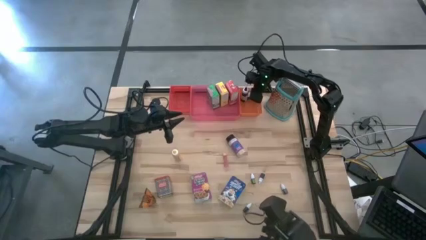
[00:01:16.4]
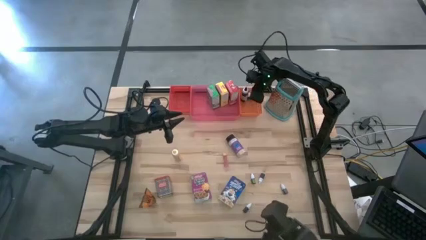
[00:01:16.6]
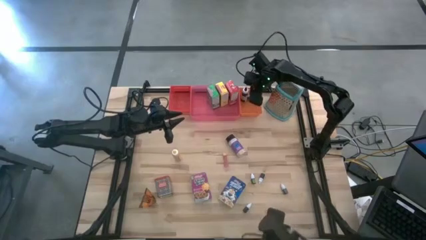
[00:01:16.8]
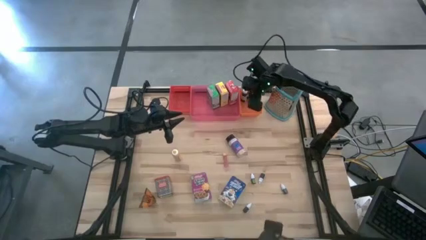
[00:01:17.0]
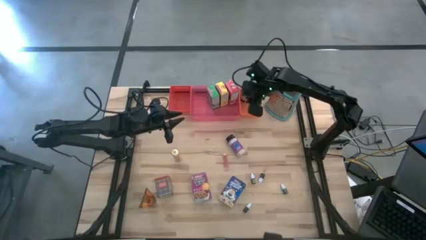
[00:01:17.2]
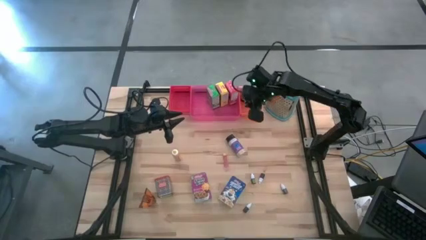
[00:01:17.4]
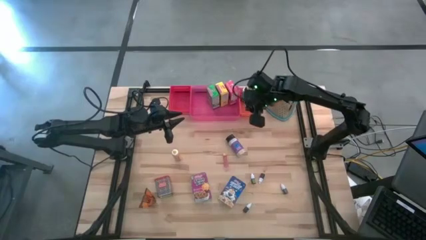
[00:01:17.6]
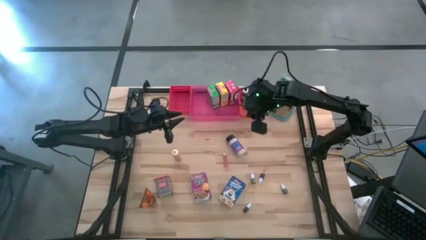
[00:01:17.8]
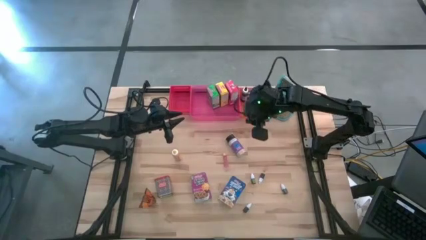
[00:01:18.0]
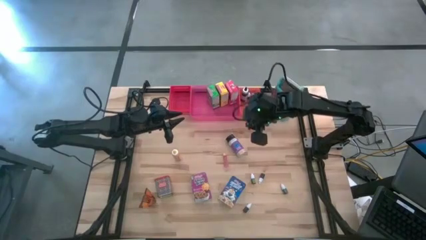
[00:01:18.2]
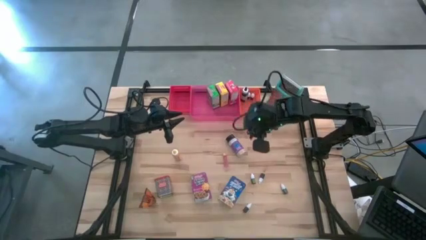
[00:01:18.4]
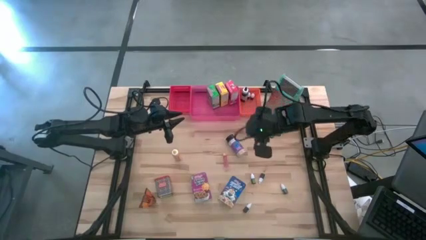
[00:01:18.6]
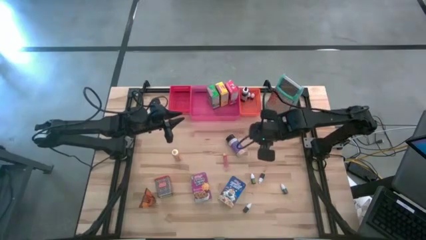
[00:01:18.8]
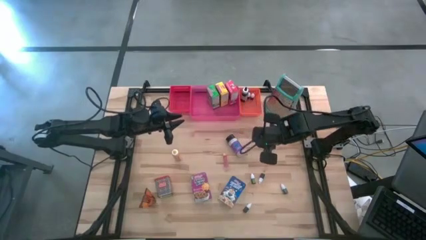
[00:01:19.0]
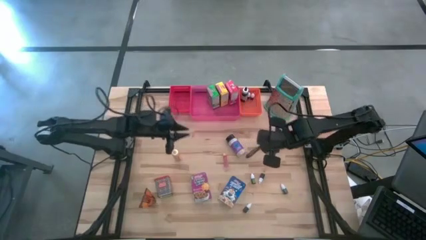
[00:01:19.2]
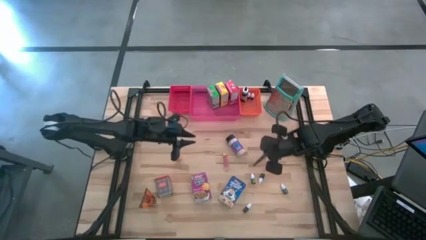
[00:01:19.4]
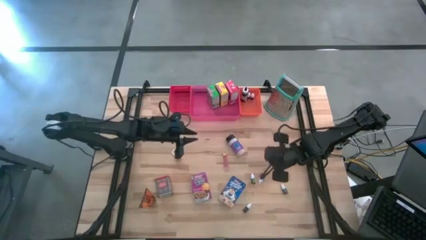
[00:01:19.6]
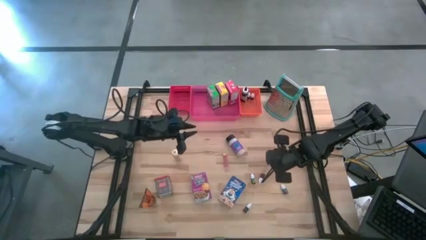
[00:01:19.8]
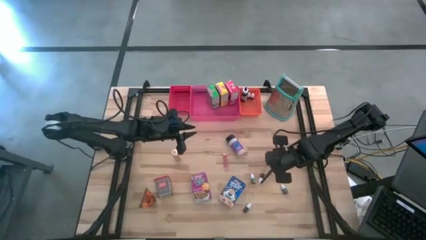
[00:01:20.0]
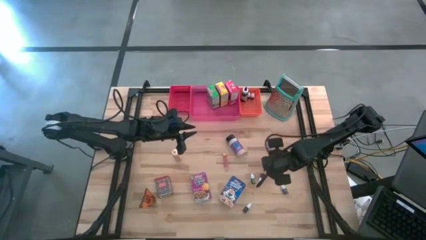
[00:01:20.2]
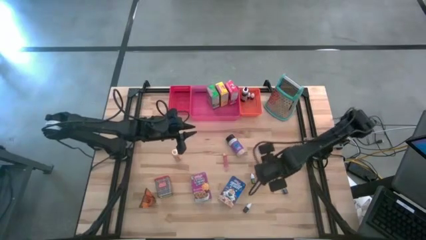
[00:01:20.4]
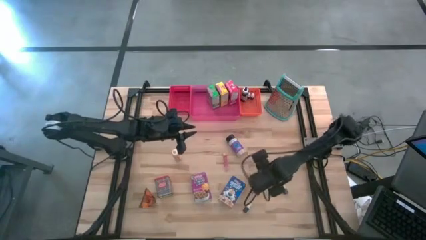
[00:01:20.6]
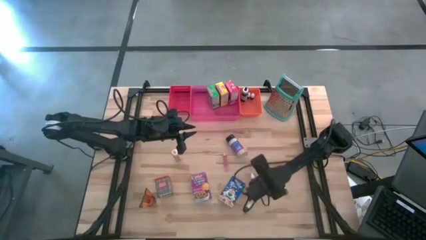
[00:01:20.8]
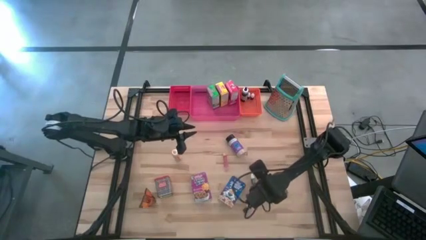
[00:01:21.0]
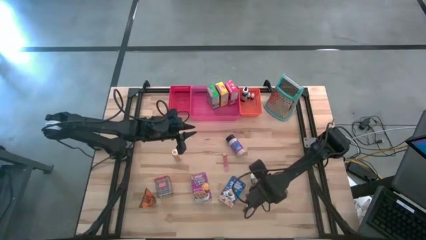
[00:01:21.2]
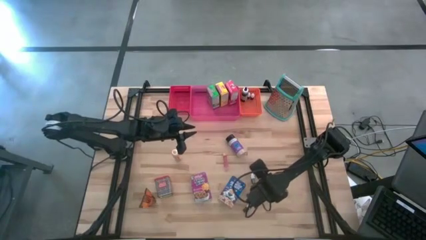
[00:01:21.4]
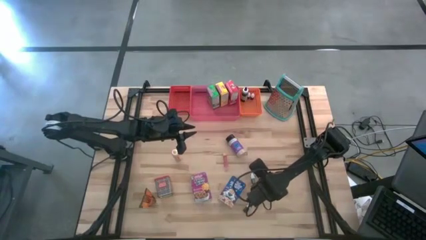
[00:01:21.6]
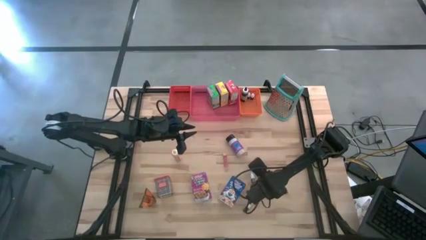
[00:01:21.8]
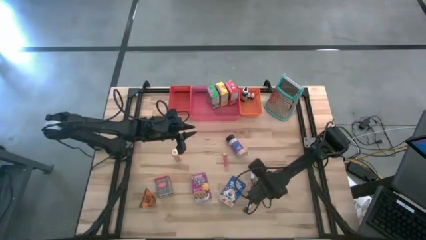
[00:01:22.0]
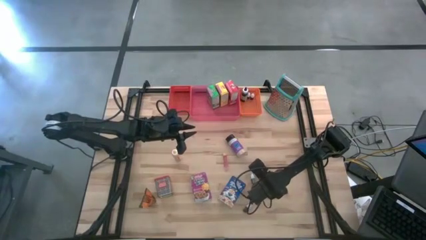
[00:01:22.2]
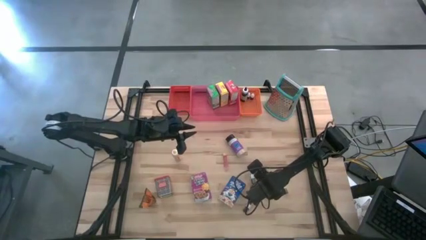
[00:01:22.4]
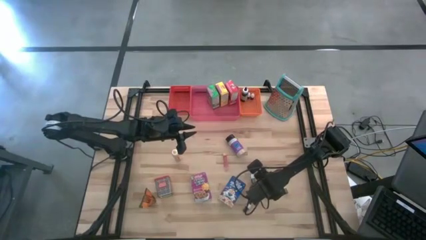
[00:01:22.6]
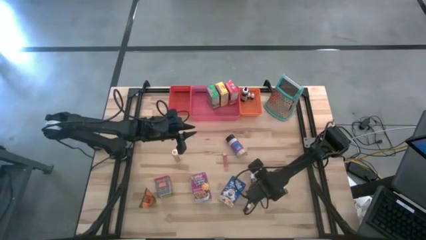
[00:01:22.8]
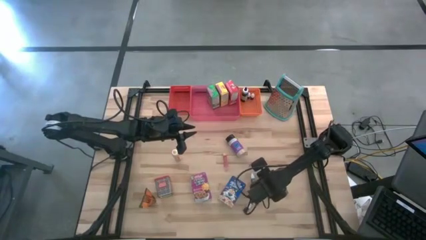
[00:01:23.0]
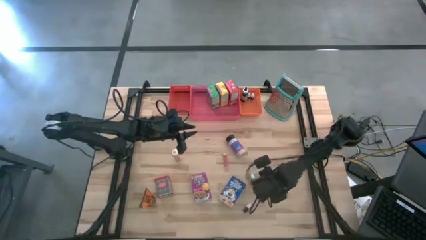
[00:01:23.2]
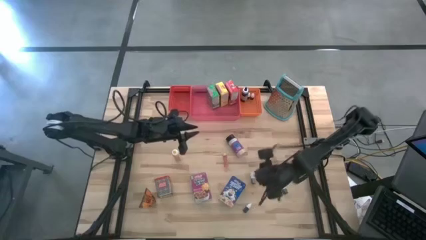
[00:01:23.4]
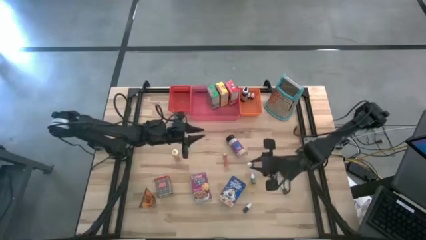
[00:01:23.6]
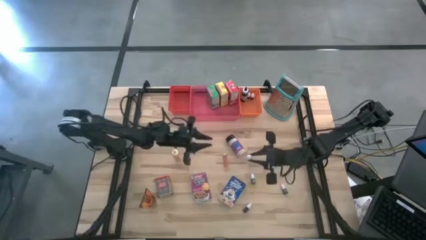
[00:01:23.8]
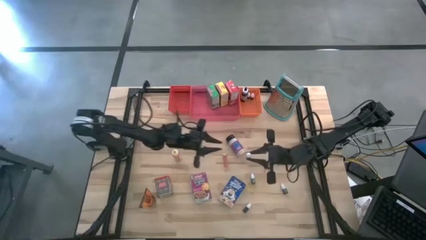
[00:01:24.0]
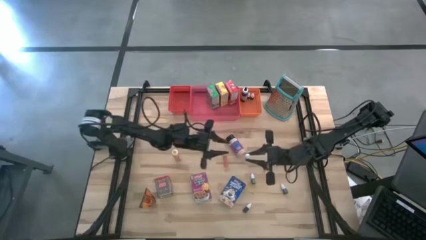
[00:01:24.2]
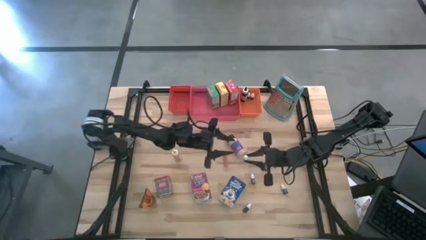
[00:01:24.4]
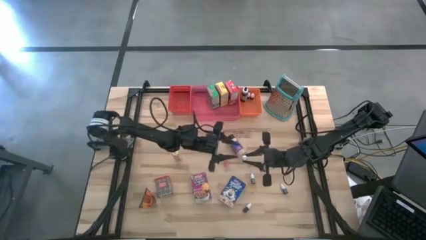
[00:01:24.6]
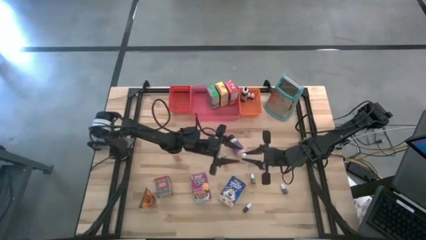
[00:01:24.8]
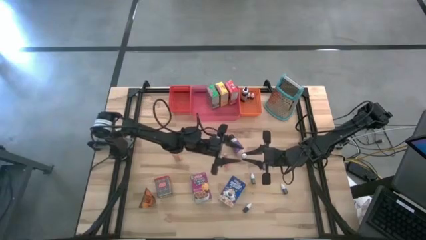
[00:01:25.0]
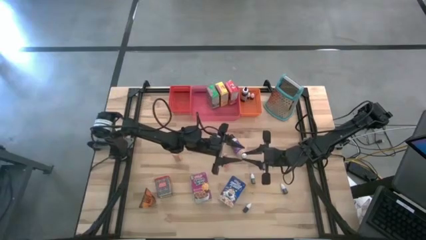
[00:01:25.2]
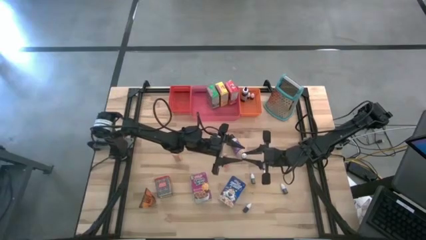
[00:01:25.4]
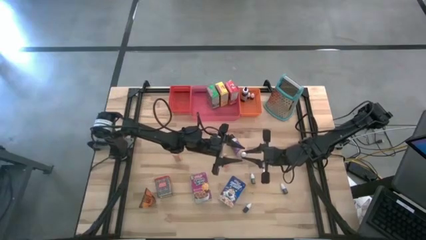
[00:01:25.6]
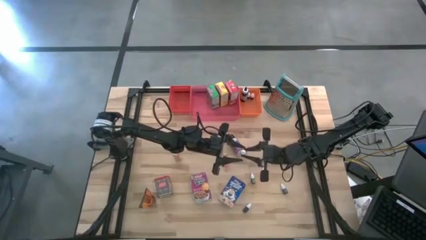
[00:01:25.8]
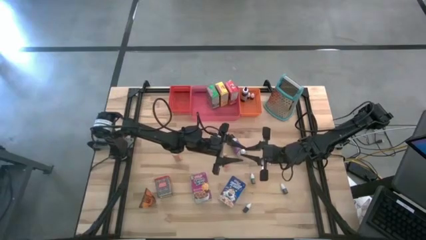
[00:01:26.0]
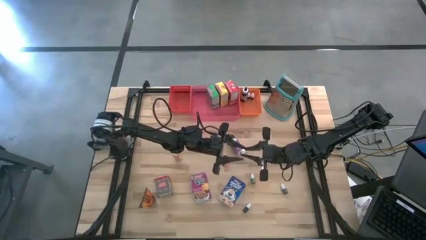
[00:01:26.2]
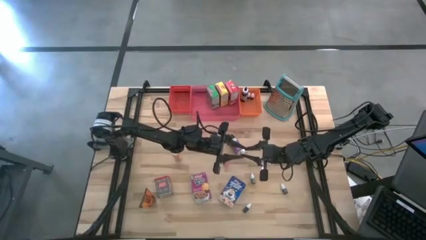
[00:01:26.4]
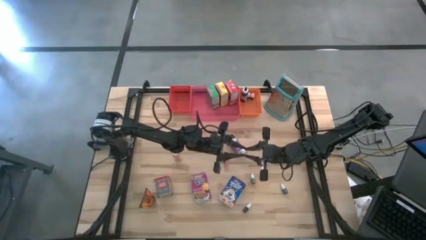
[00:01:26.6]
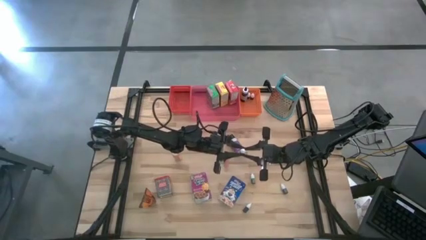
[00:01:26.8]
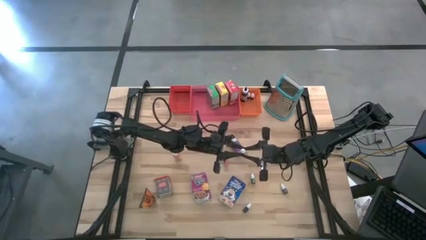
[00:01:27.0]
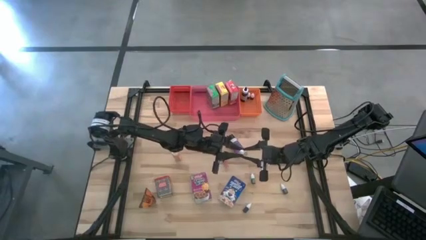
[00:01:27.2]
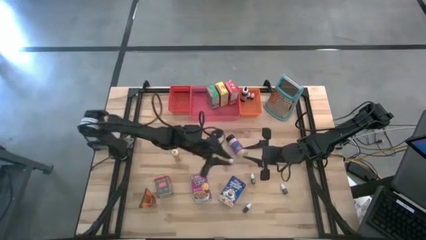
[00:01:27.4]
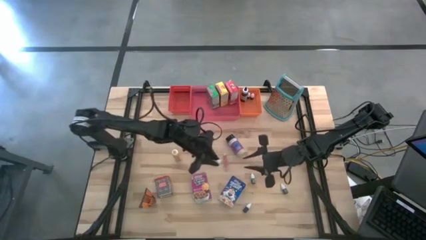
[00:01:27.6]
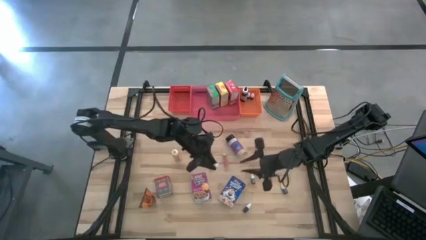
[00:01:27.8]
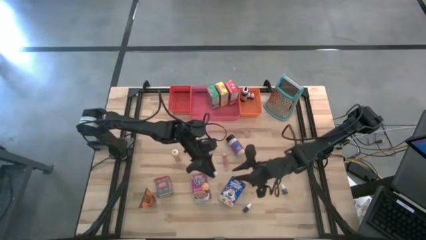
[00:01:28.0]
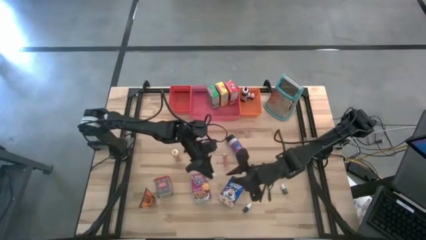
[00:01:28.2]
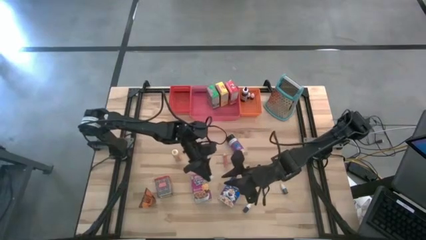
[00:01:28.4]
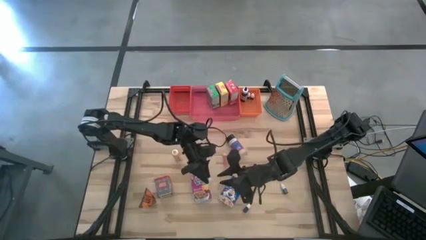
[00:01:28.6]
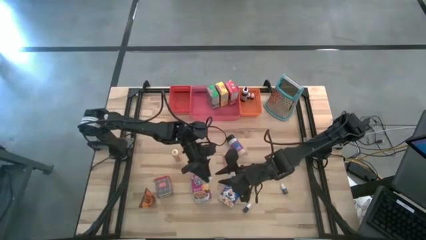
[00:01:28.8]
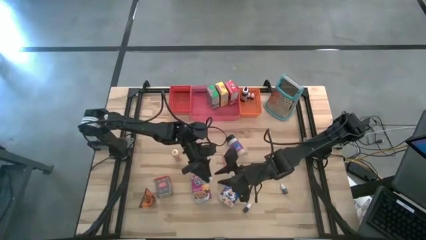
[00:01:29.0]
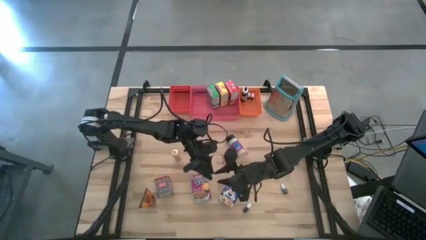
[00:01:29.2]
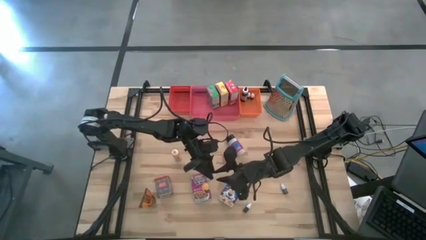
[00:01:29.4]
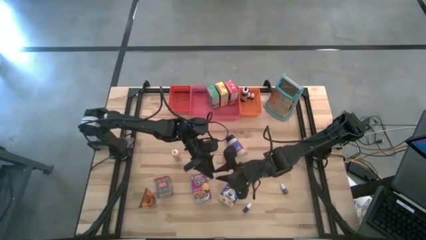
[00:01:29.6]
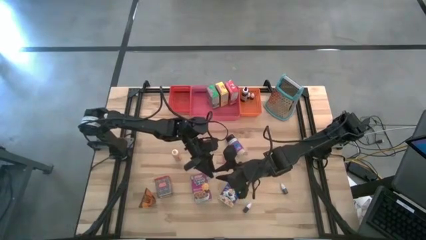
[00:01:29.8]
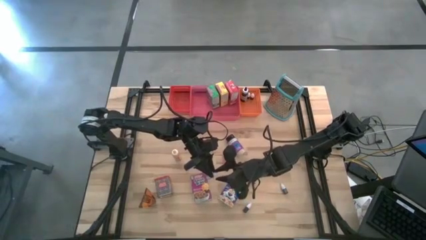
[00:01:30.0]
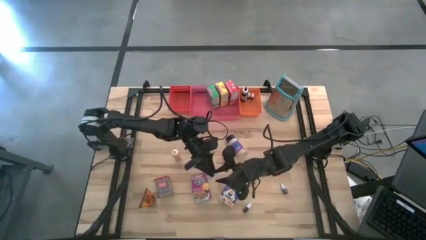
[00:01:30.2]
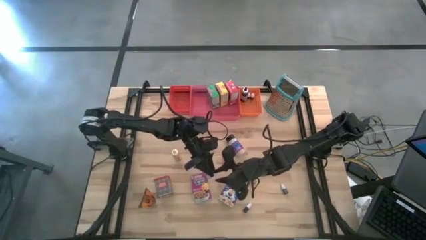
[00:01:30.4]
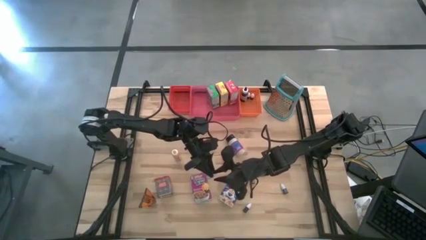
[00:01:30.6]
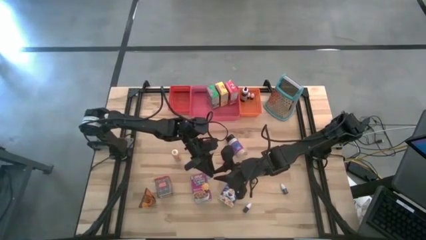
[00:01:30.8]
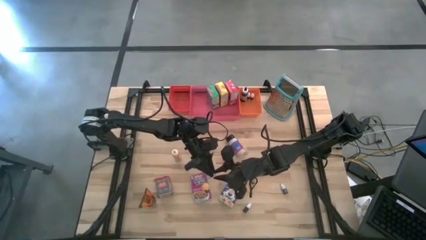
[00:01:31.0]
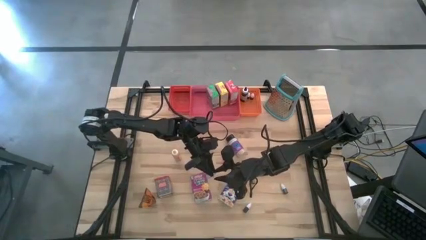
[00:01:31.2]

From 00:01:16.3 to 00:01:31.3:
Task: Pick & Place Kitchen Items
Put the red food coloring bottle into the orange bin
